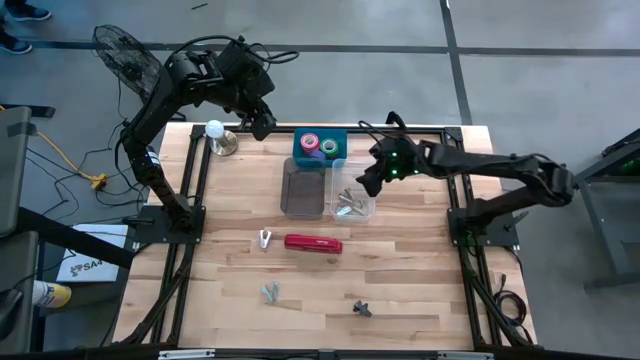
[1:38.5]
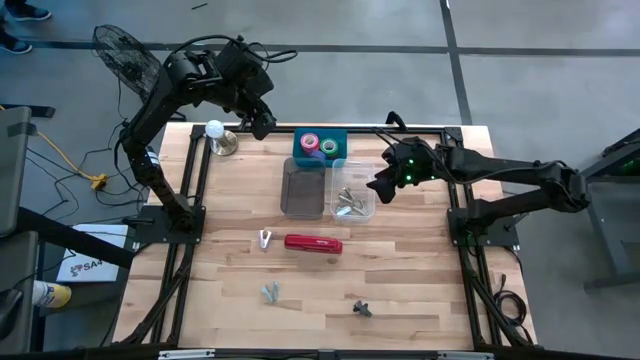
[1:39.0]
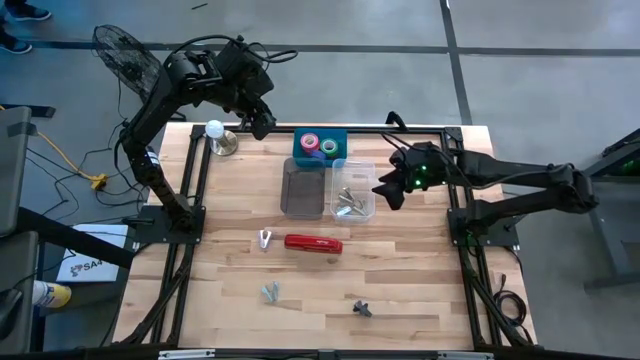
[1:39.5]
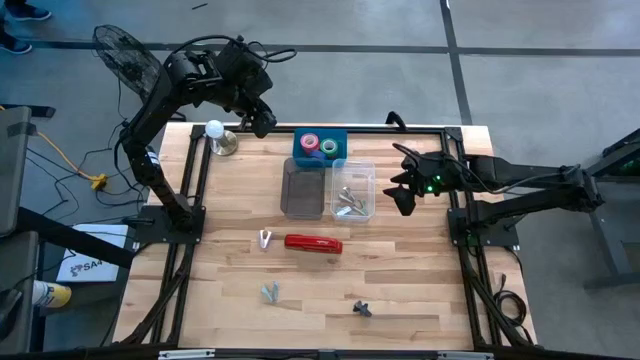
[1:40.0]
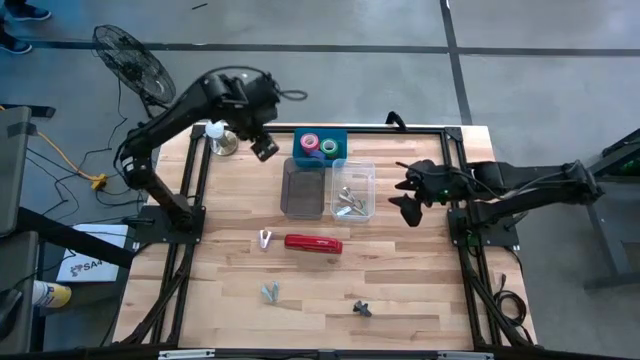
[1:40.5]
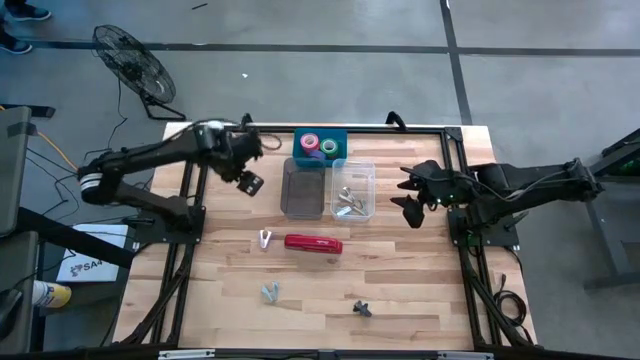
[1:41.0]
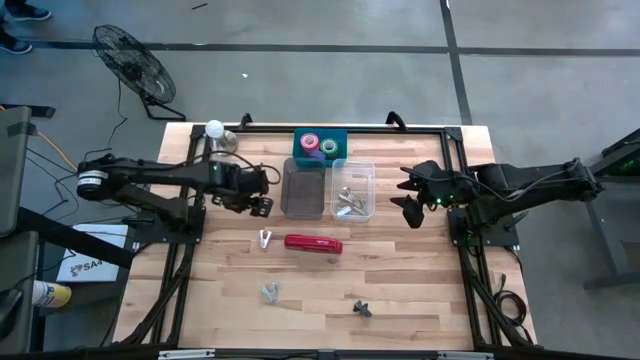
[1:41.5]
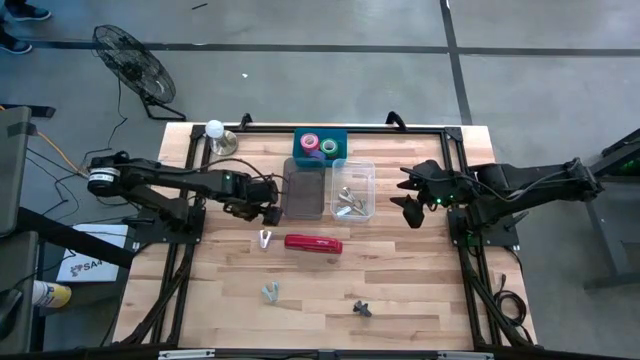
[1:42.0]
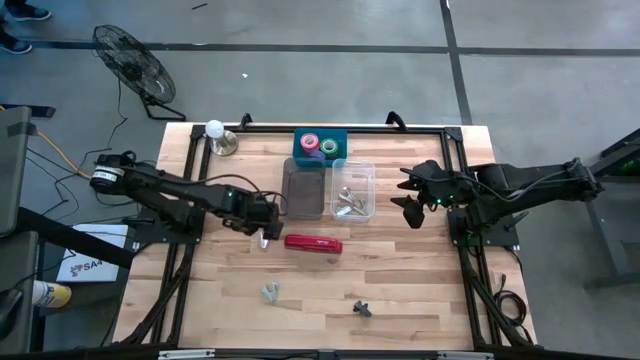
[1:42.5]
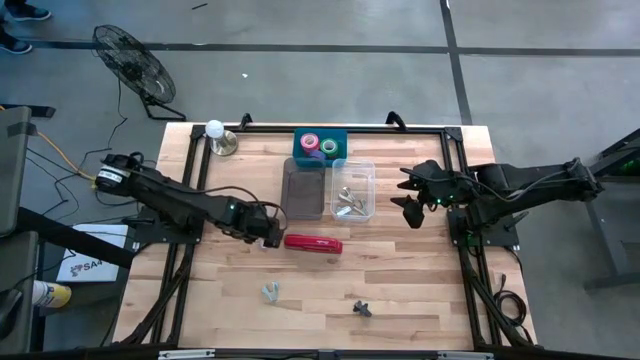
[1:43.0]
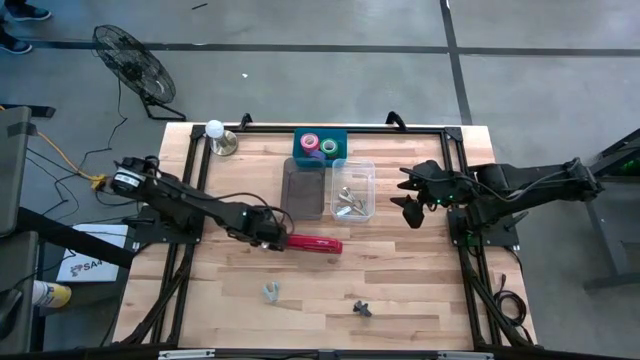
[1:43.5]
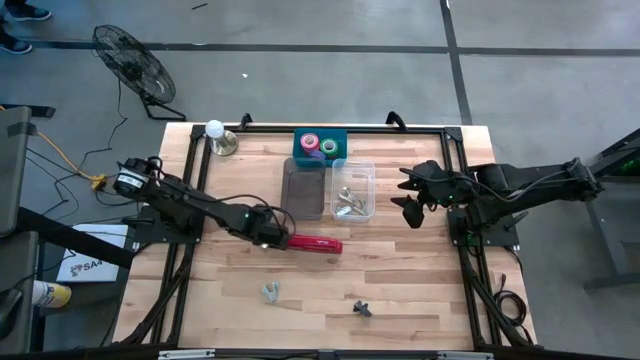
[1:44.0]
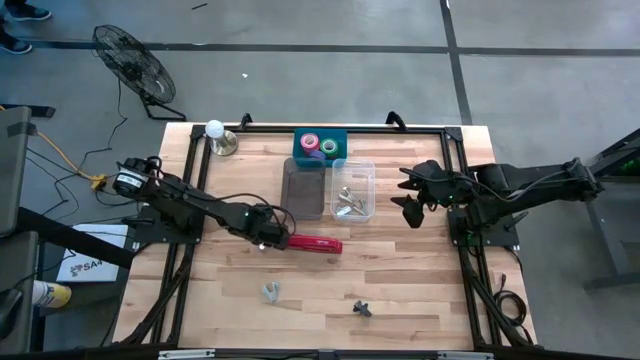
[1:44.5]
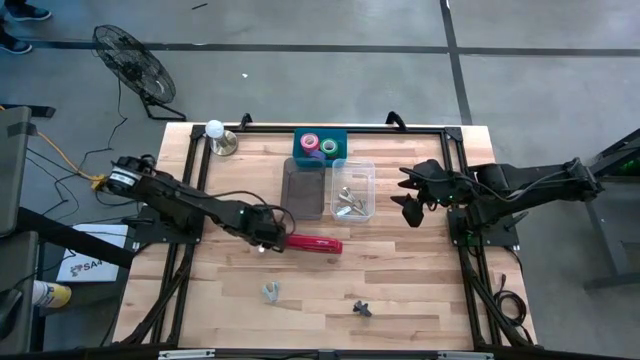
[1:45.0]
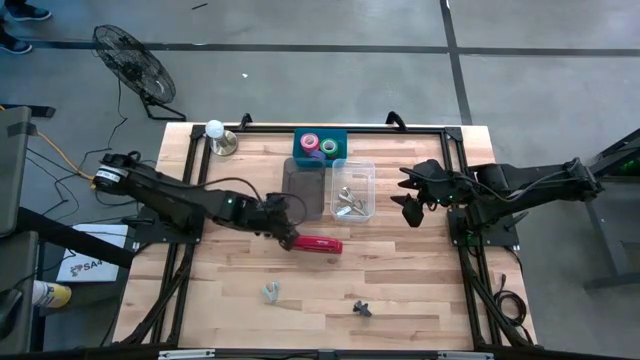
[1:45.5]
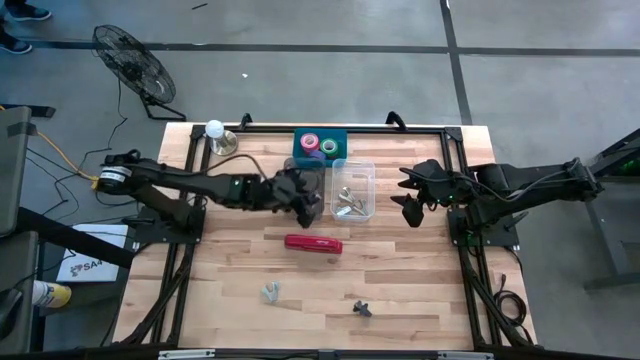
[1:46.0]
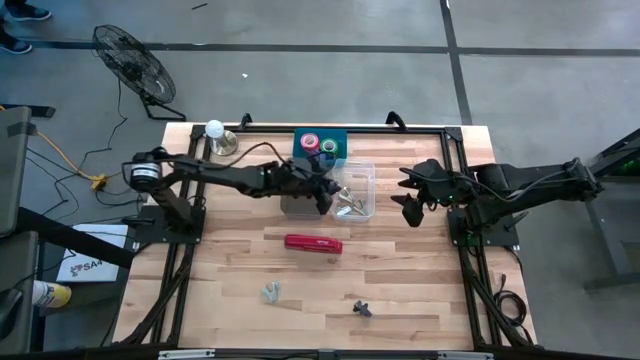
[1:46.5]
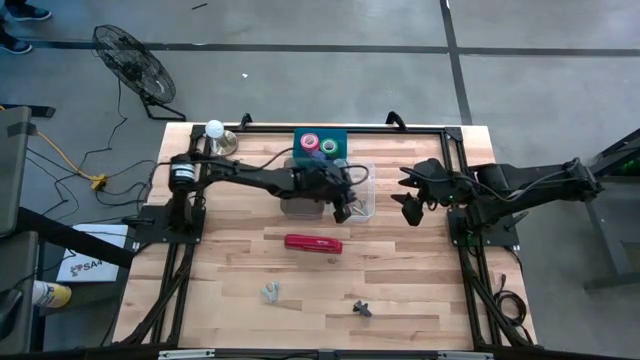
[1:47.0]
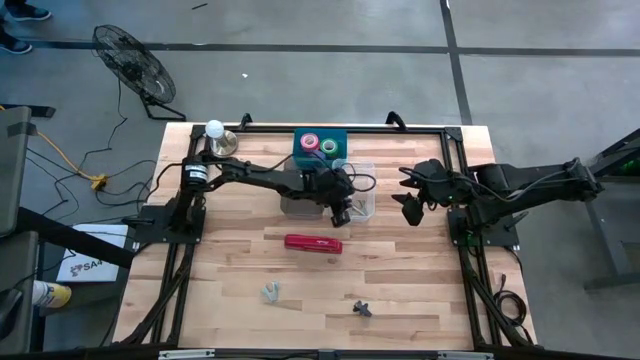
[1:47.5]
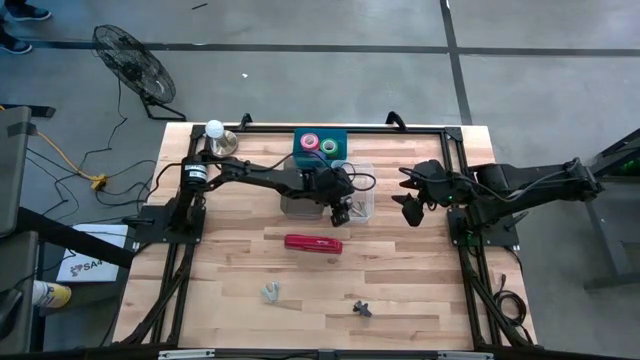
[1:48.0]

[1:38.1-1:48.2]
Task: Pick and place Stapler, Stapler remover, tape
Put the purple staple remover into the transparent bin

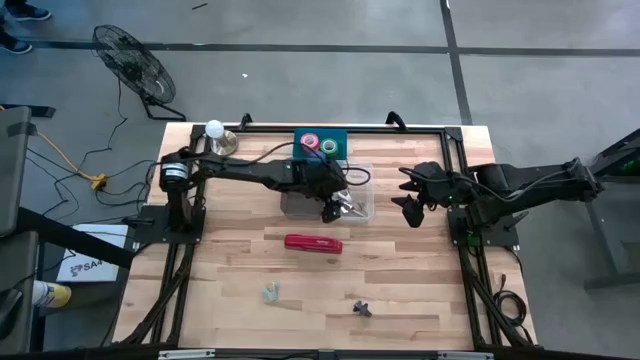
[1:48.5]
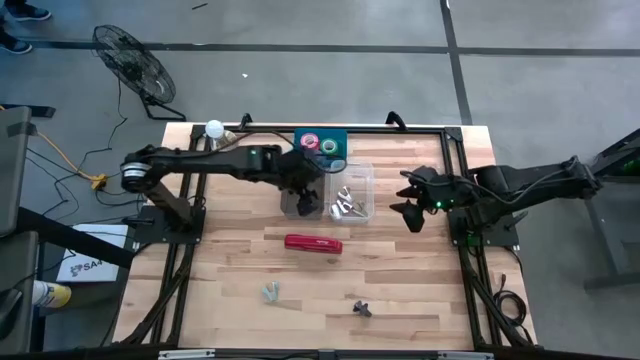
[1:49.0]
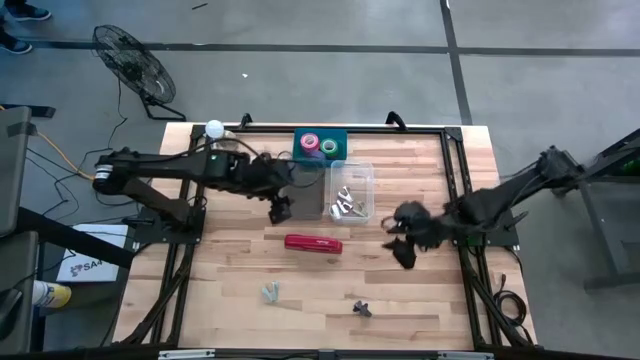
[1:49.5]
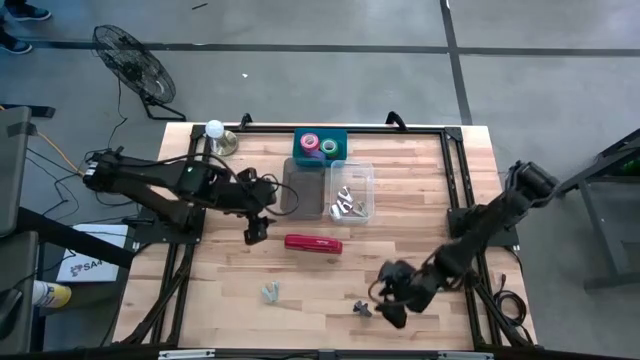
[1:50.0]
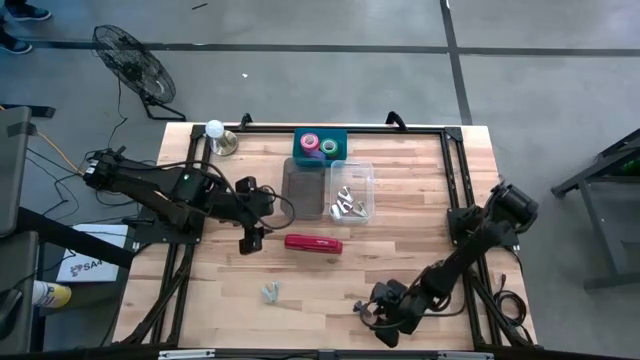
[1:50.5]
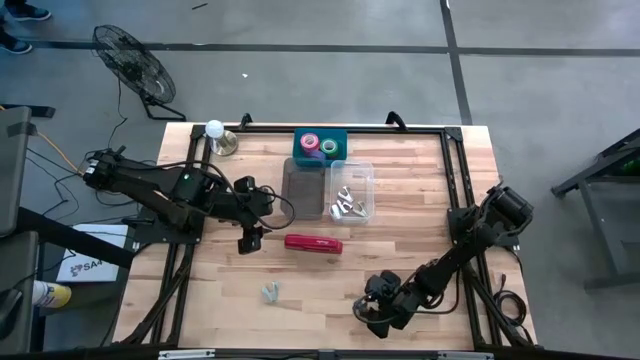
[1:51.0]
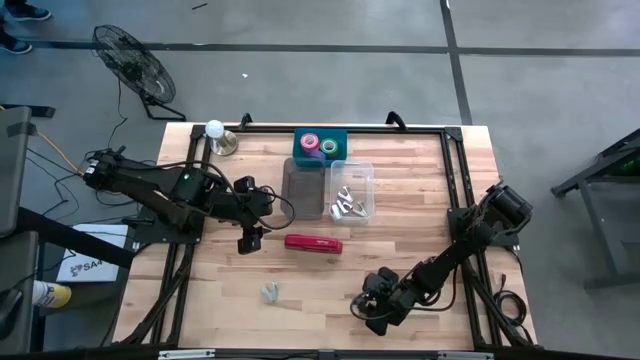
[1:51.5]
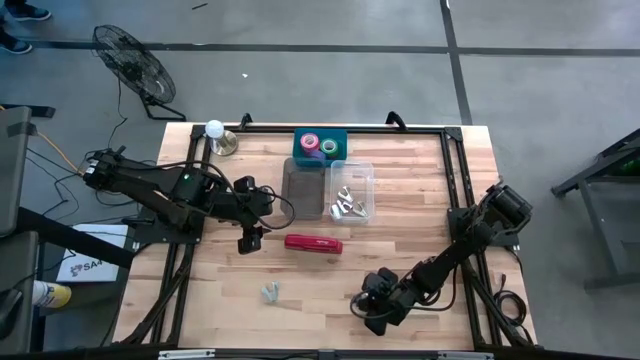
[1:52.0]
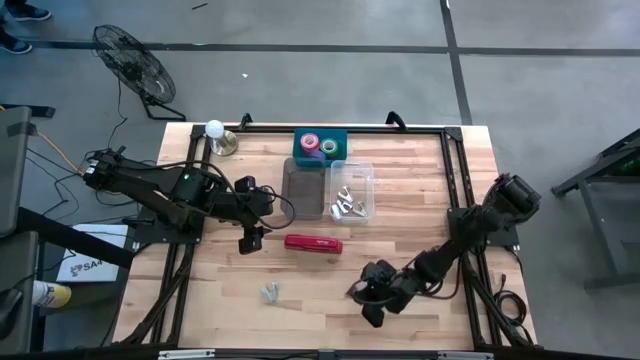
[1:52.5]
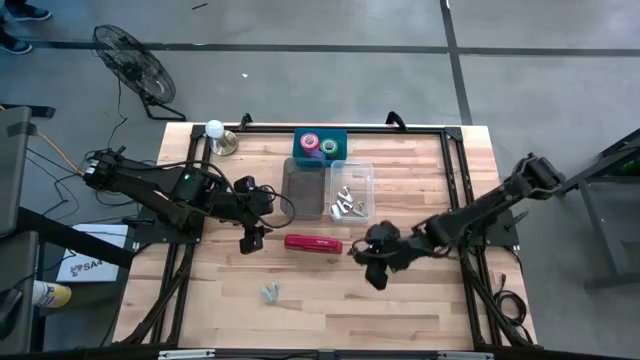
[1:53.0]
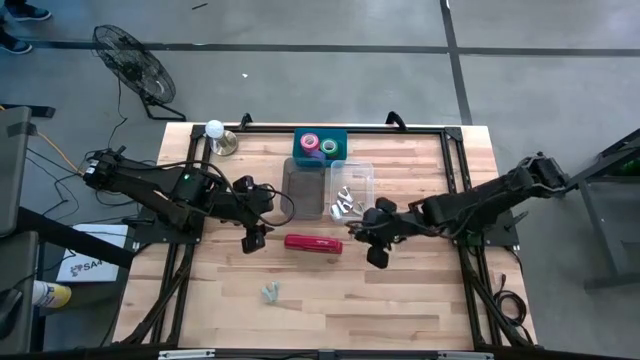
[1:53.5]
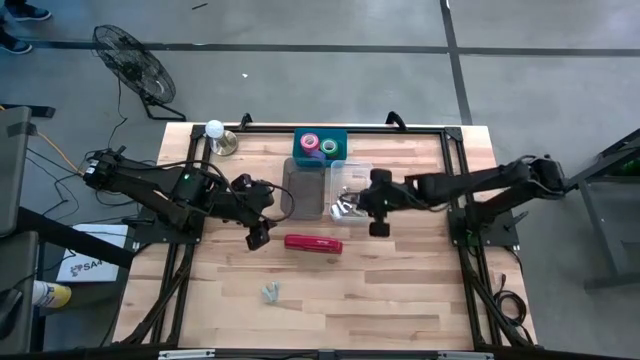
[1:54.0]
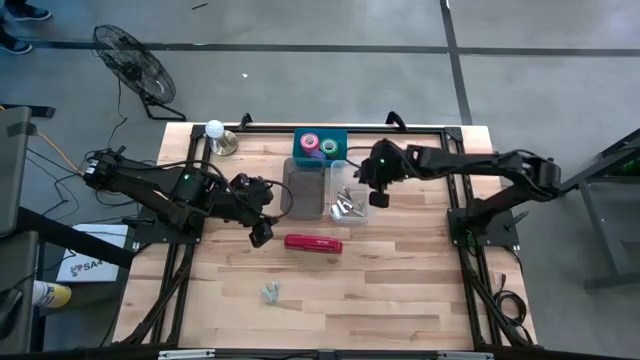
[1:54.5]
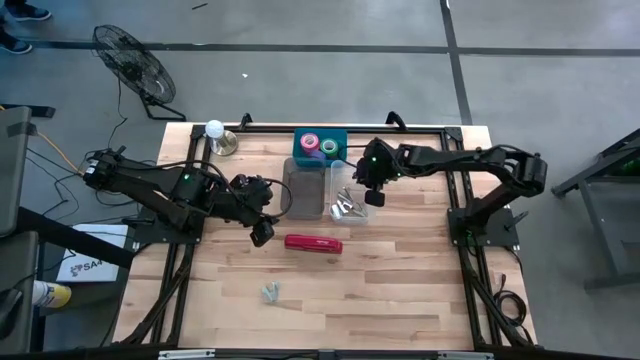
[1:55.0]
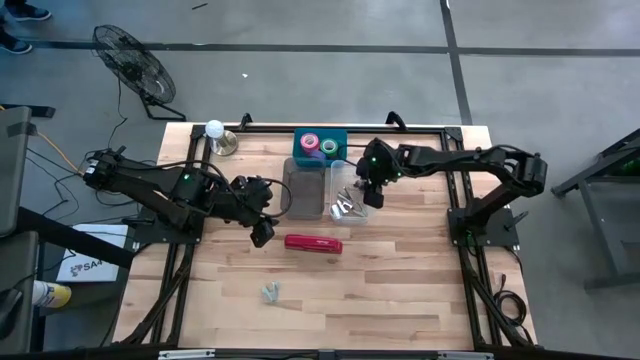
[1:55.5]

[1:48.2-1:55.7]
Put the black staple remover into the transparent bin

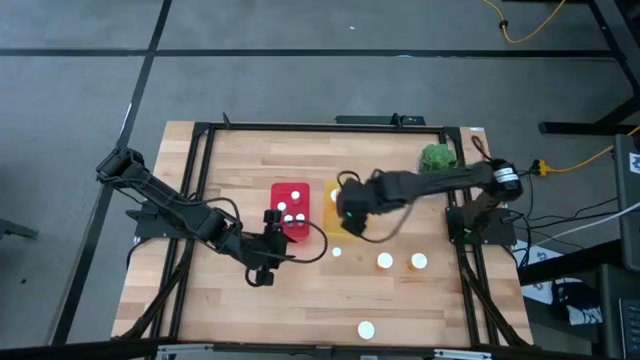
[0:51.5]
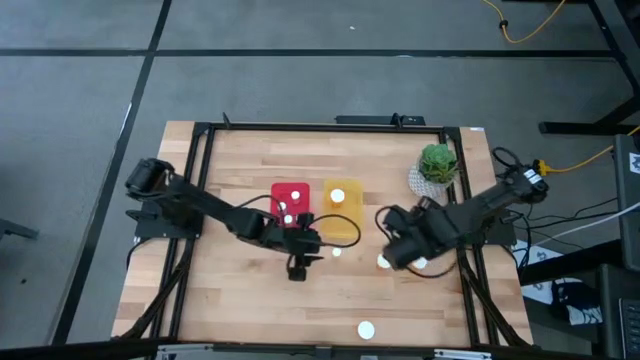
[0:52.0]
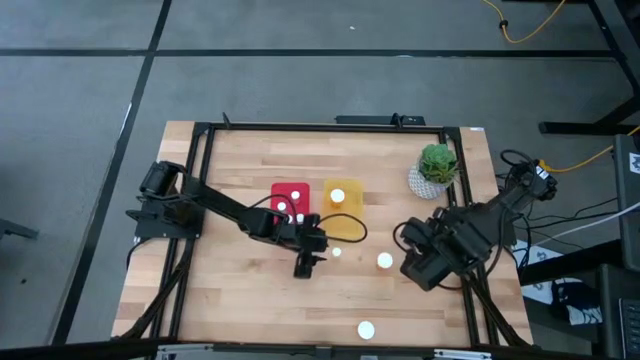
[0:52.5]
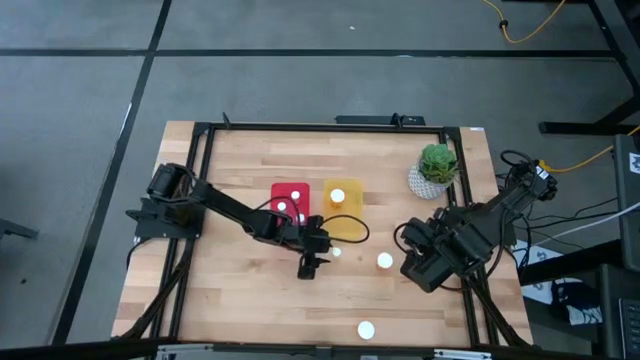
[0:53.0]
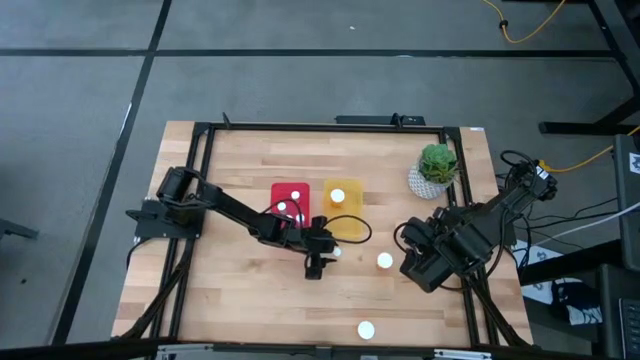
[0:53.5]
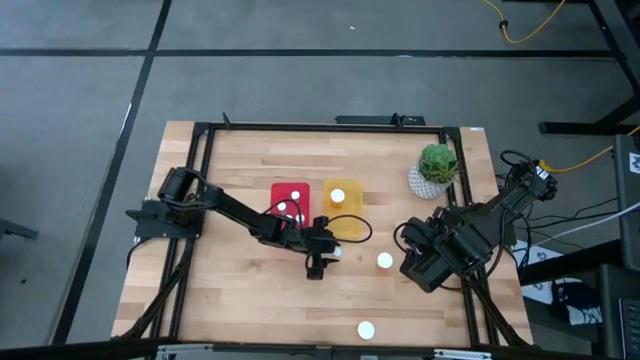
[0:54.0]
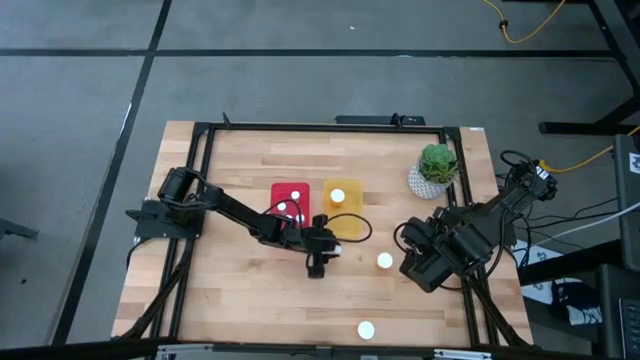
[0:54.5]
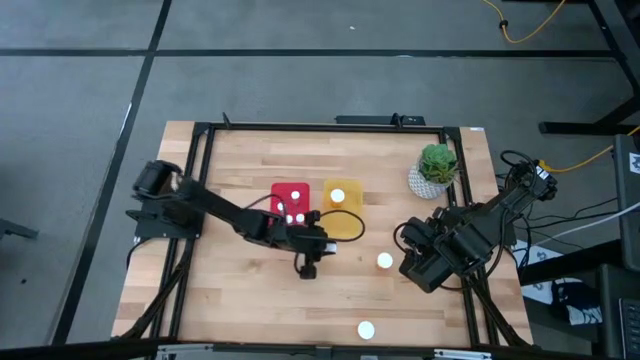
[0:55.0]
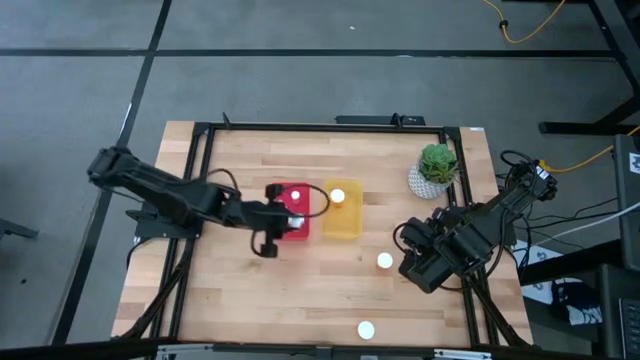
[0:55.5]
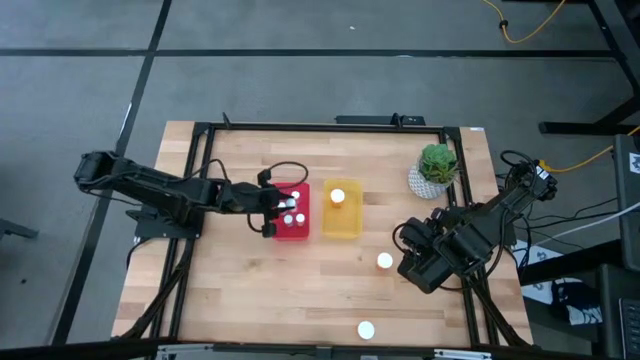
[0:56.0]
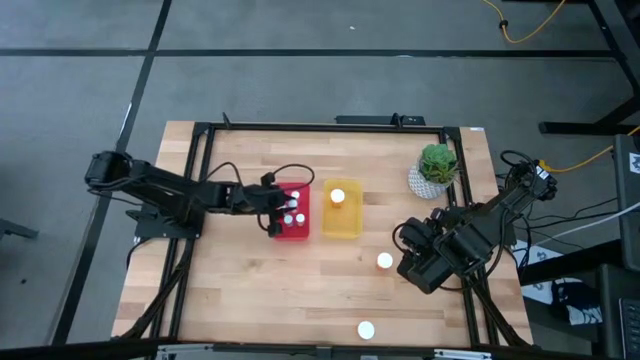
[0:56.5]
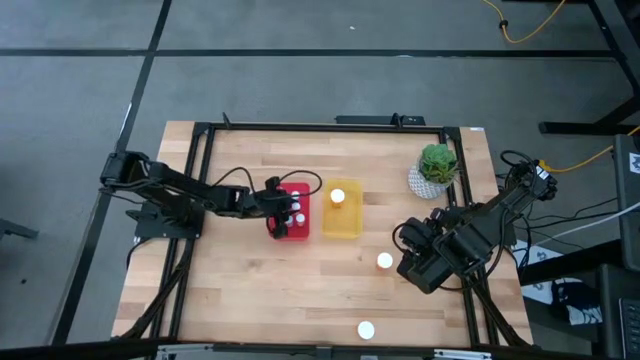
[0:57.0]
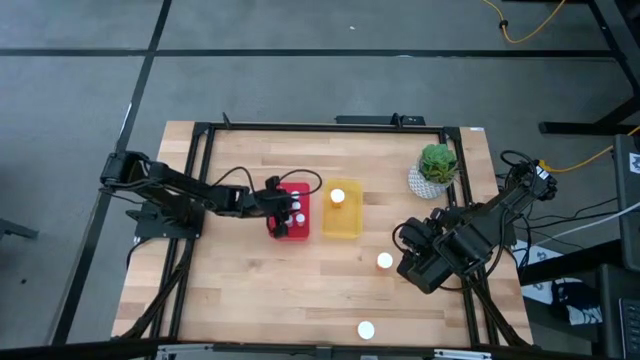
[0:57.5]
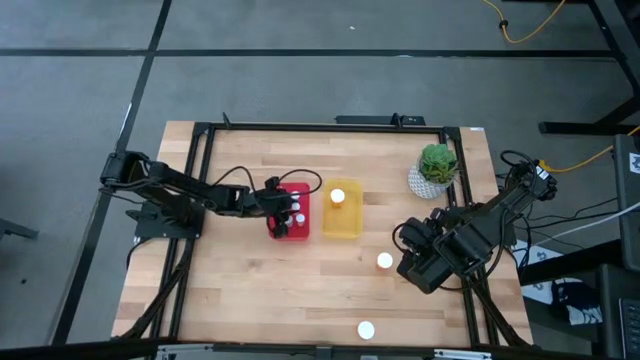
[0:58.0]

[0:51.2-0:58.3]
Task: Pick and place medicine bottles into bin by pill shape (circle, oval)
Put the small yellow pill bottle into the red bin
